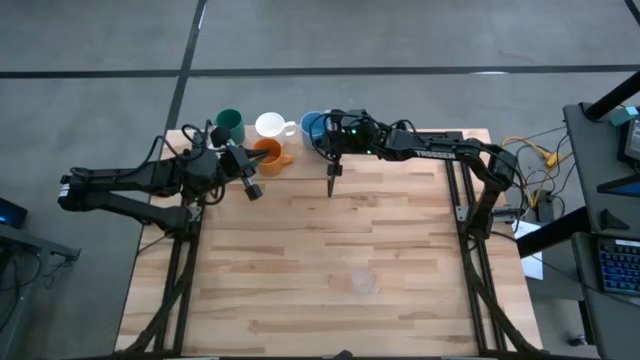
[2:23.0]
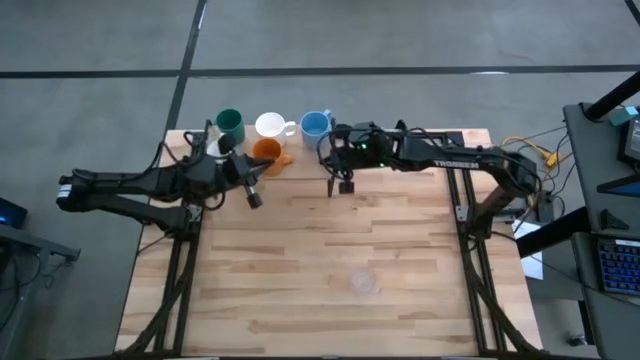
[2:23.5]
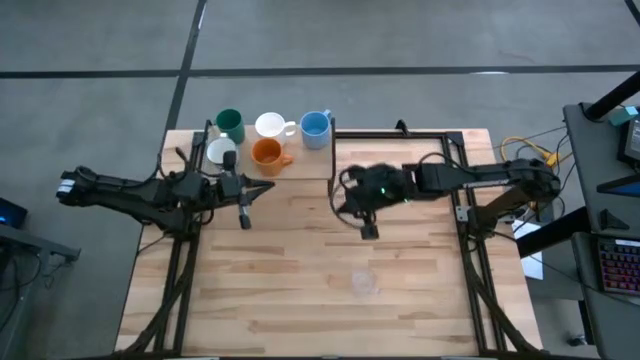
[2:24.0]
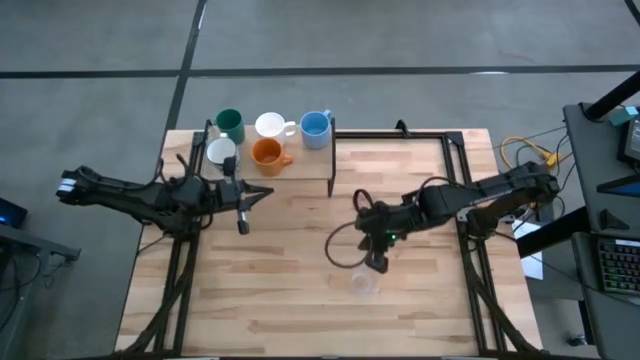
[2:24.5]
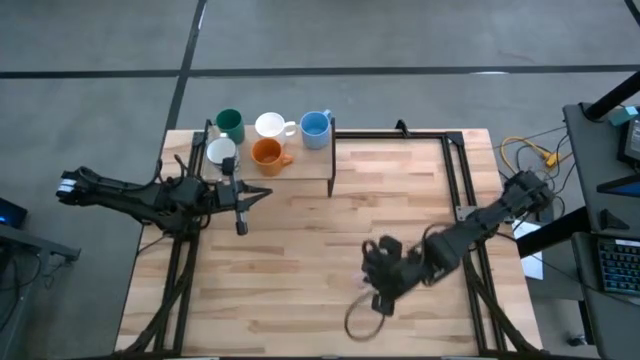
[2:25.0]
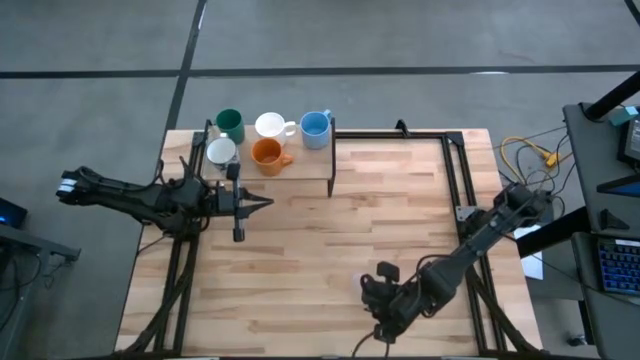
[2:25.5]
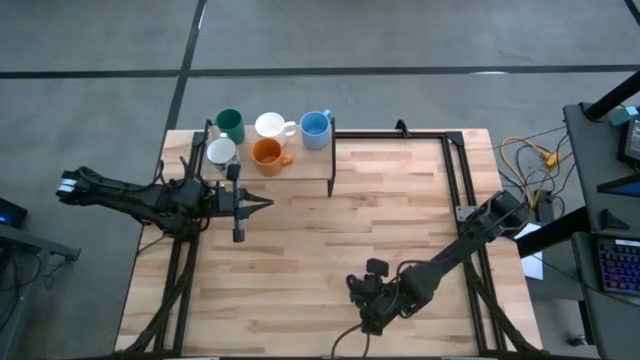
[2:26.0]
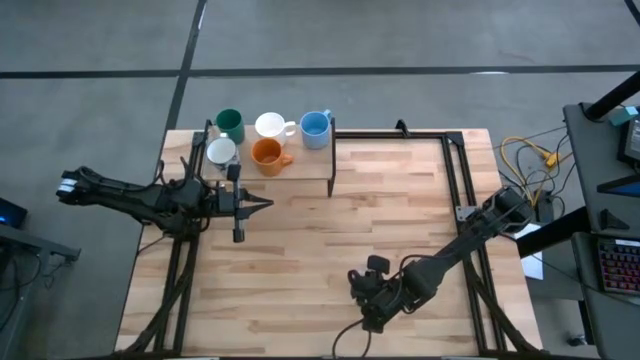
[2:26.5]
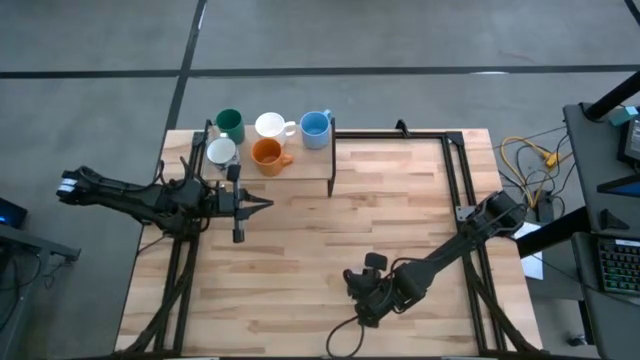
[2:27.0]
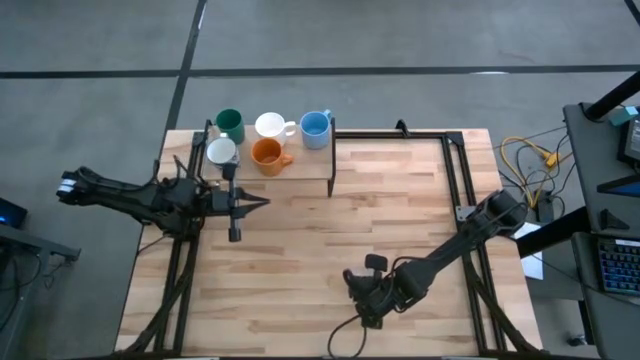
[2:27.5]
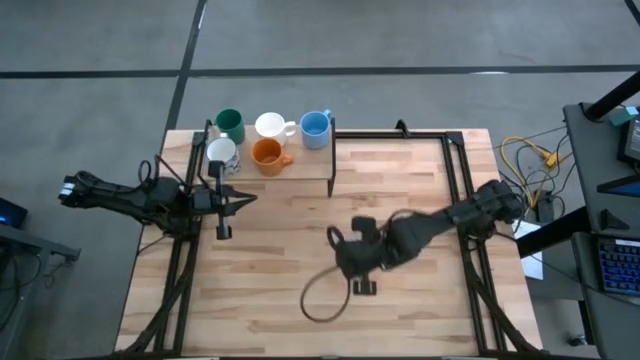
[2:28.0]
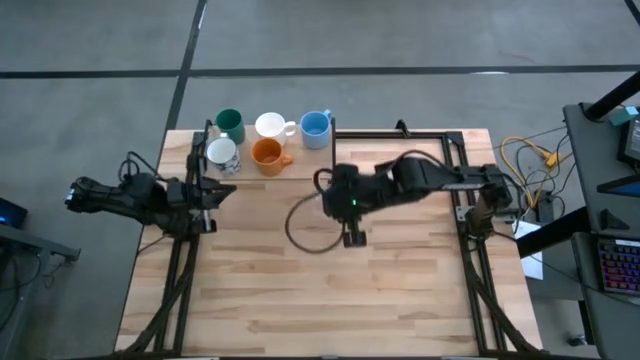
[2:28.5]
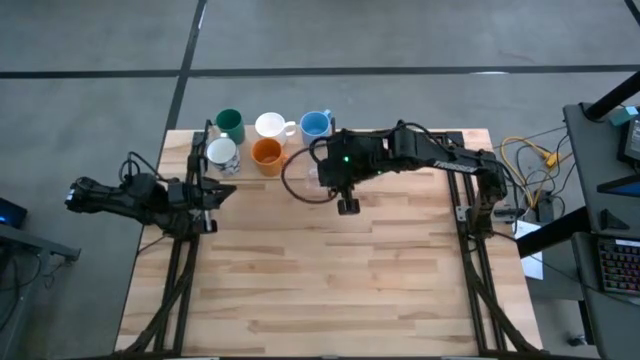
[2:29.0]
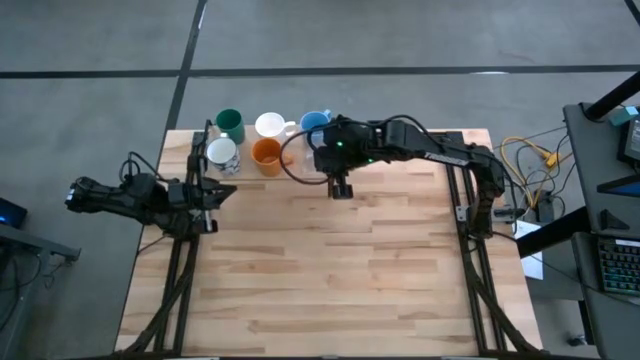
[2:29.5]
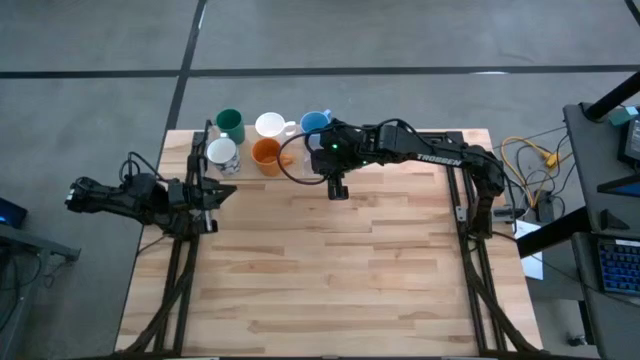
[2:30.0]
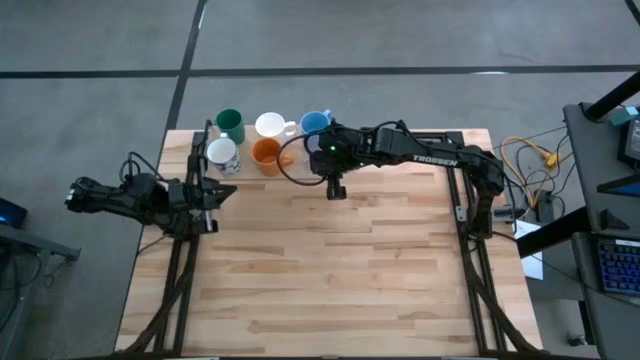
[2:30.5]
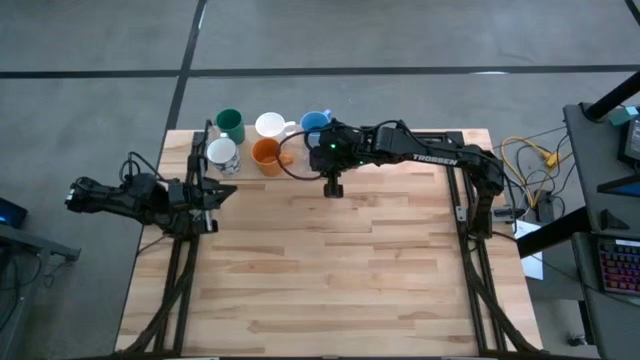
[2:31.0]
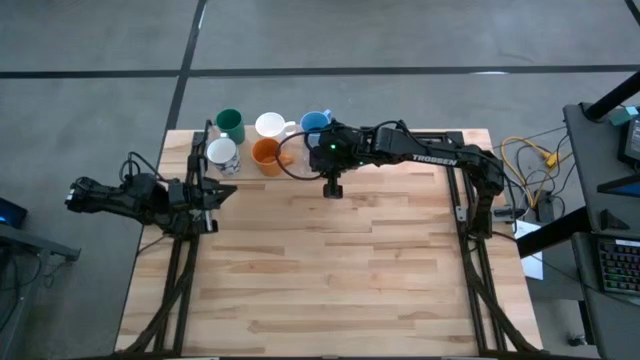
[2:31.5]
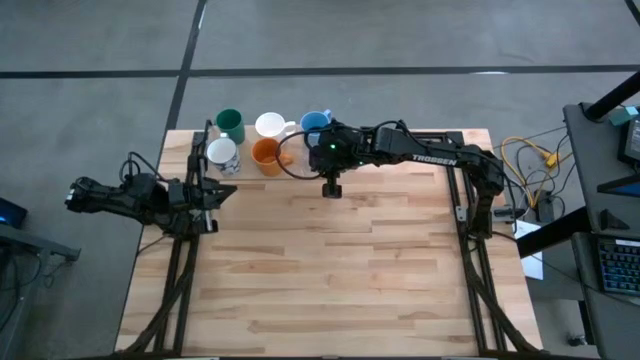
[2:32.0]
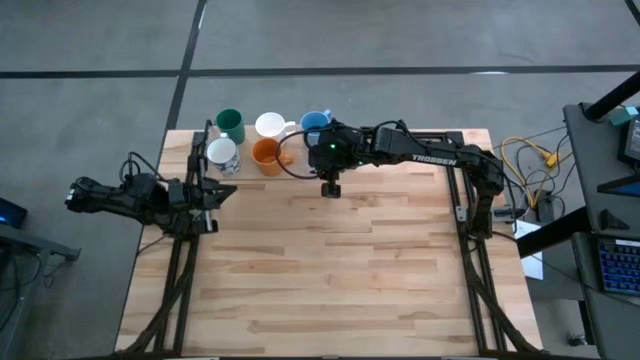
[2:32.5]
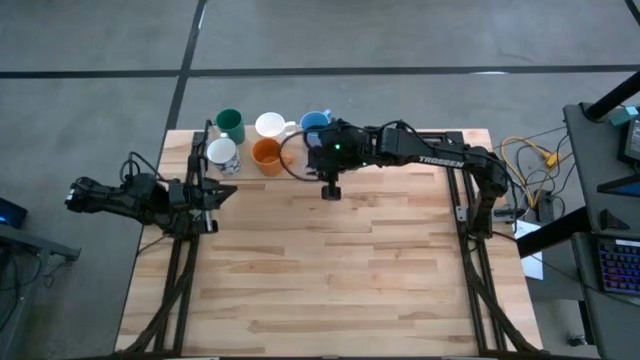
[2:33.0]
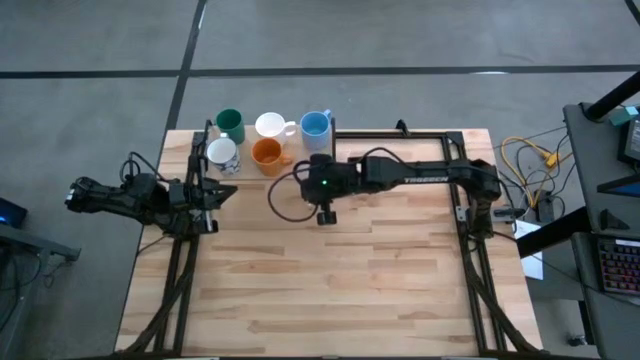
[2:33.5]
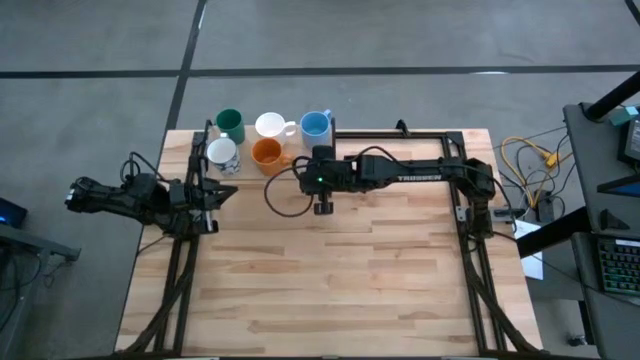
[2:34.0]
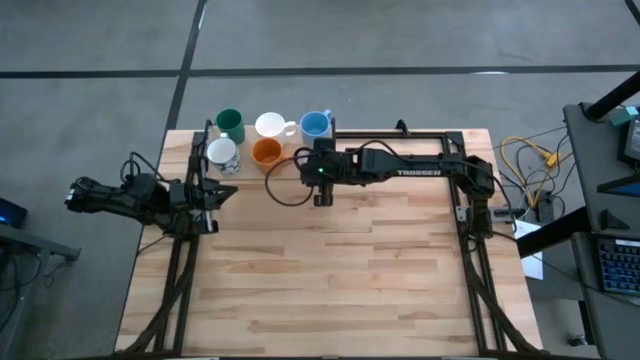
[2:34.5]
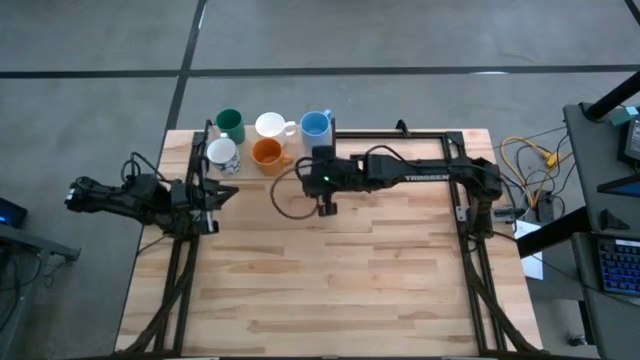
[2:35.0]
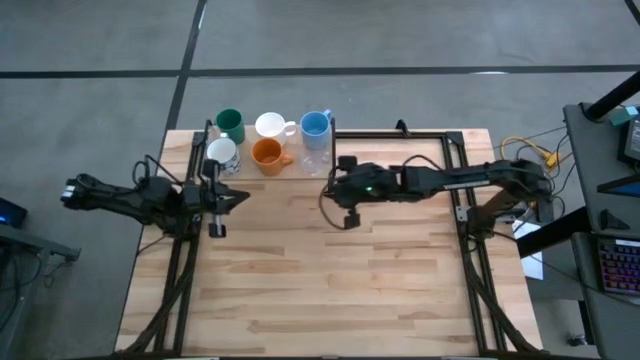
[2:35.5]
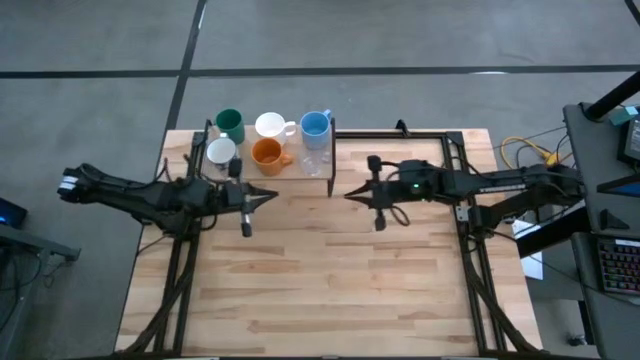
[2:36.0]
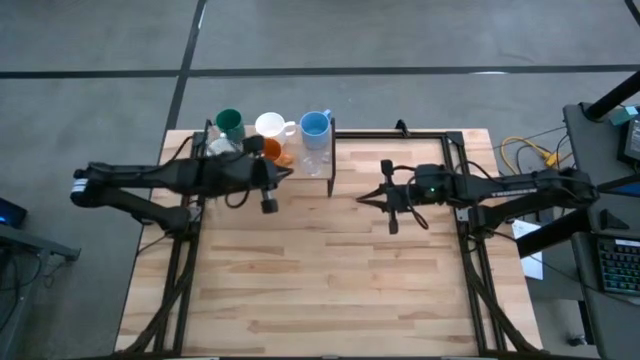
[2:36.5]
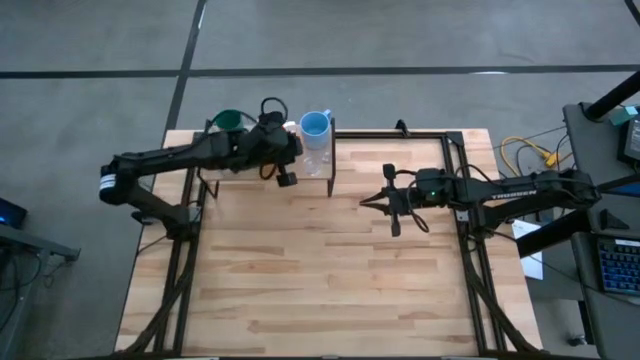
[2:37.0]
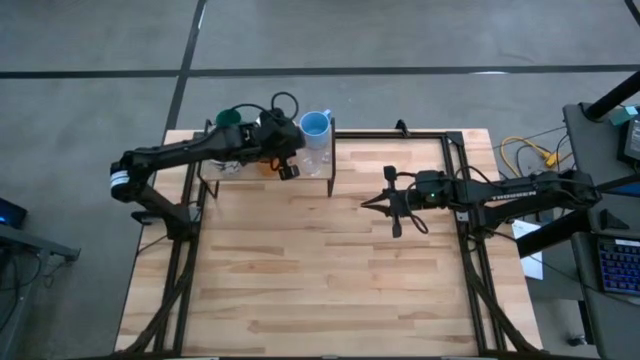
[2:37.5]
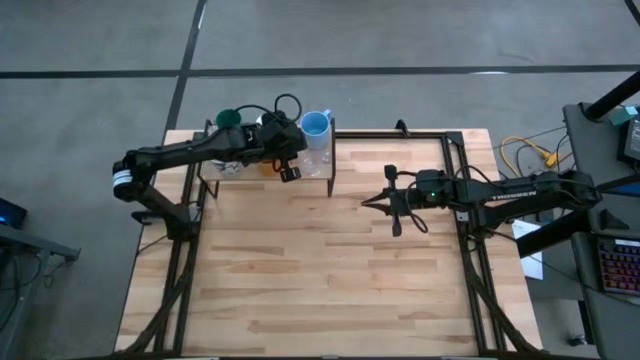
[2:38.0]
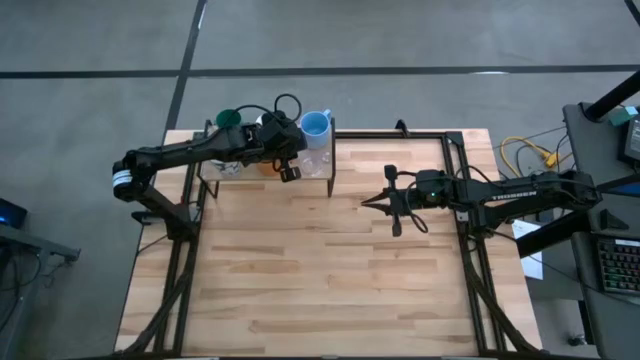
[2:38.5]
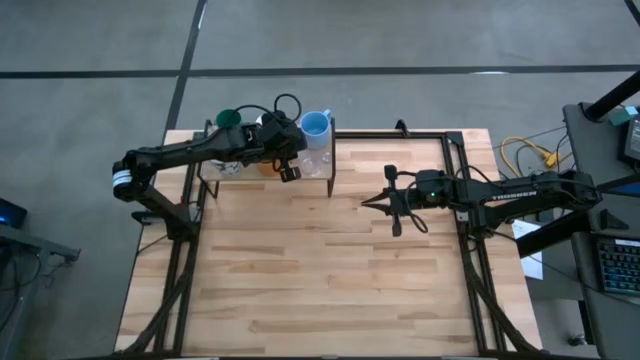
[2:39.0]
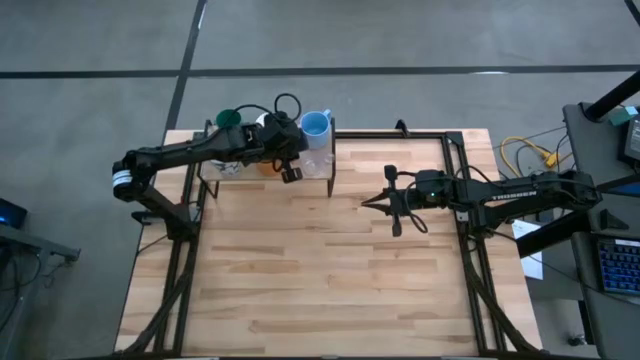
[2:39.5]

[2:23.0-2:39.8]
Task: Stack small to large cups/mugs on shelf
Put the transparent mug on the shelf

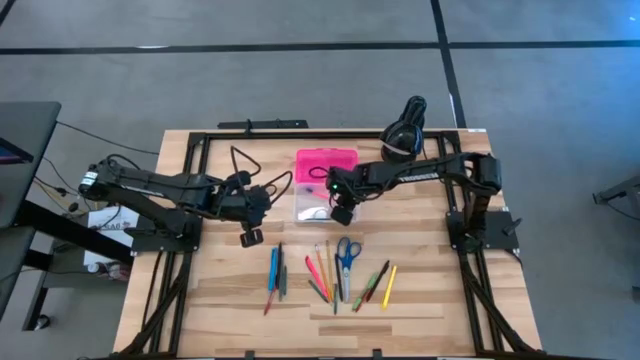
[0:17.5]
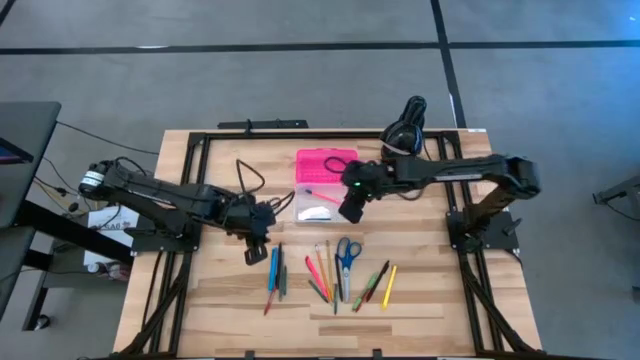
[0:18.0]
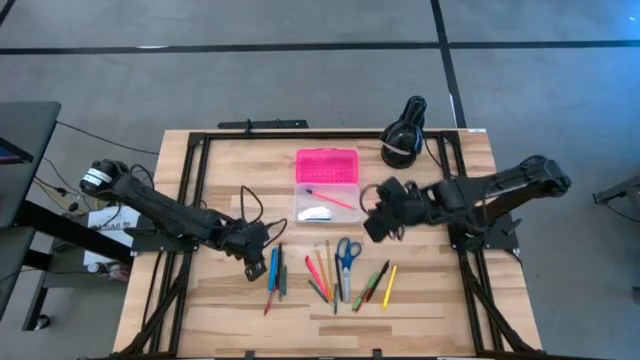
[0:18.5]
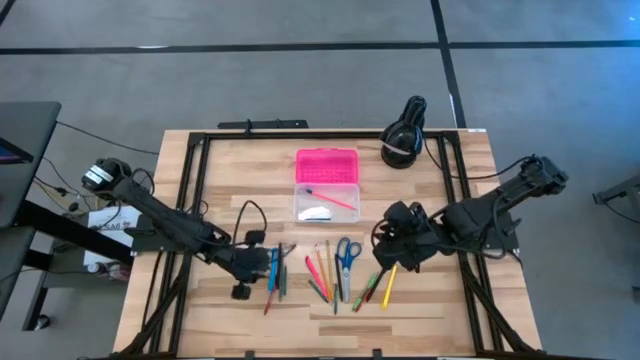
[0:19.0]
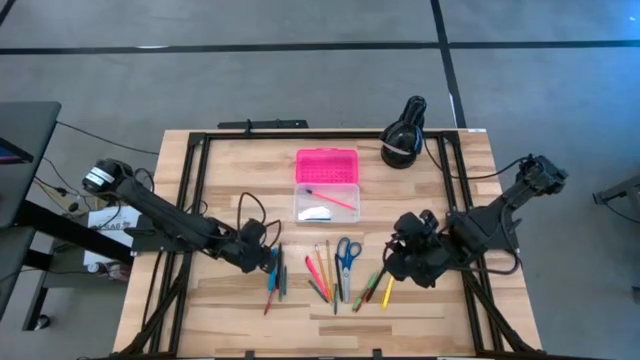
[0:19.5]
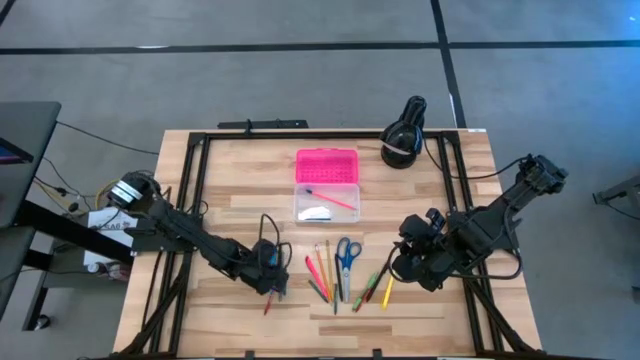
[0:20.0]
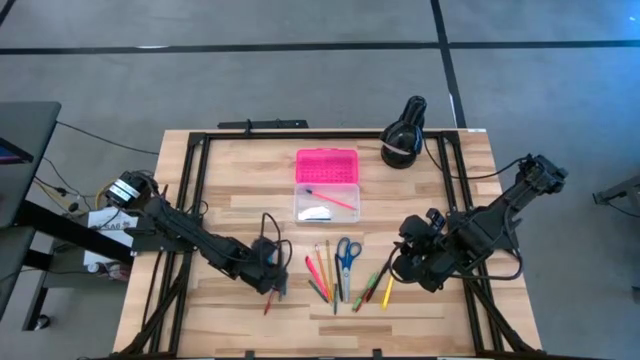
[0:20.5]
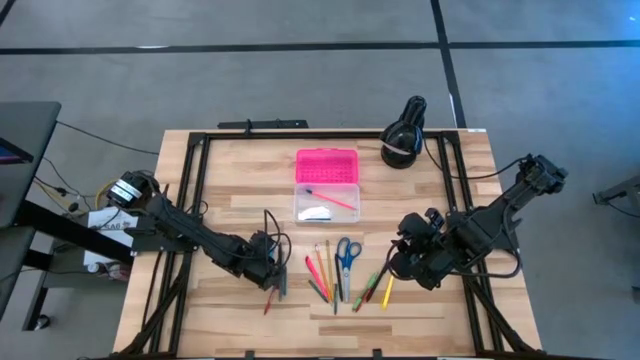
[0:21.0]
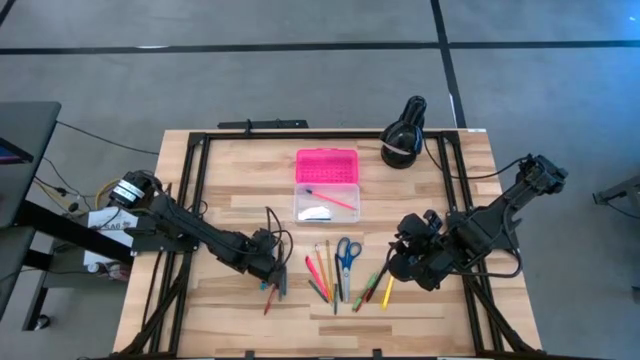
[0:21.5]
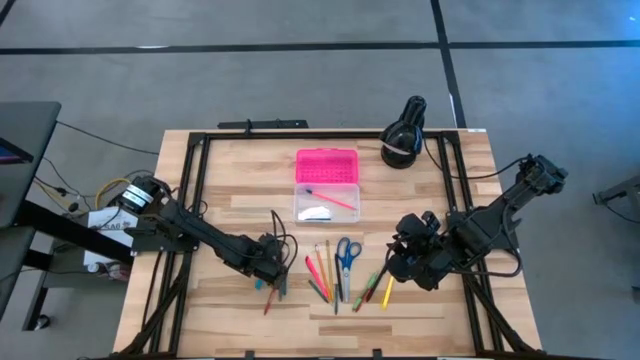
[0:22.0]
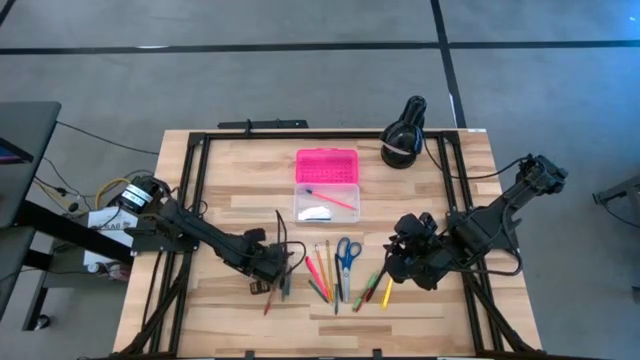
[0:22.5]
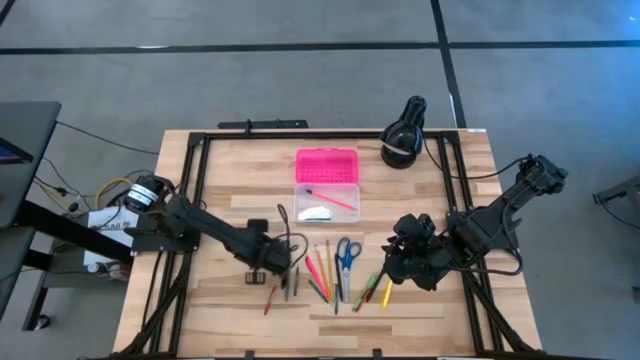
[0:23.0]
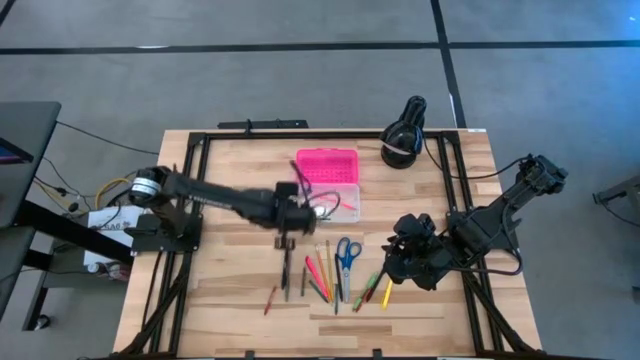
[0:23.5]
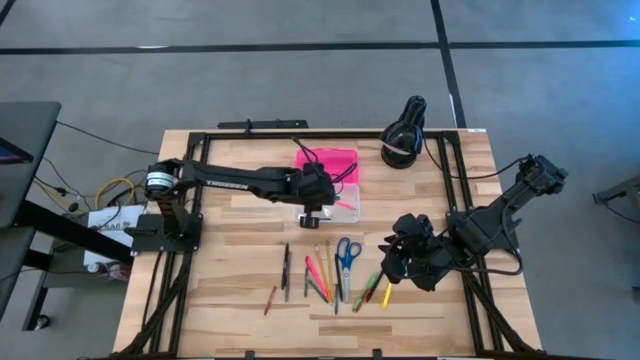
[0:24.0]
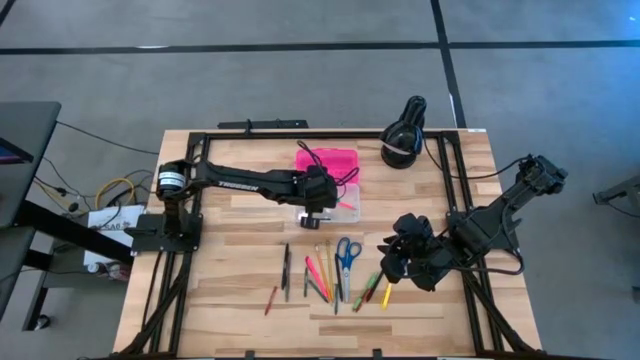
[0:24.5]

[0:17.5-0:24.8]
Task: Pick & place school supplies into a supply box
Put the blue pen into the pink supply box
